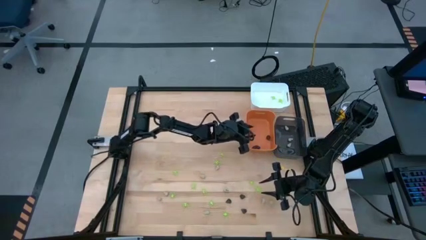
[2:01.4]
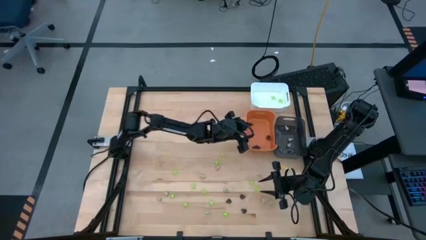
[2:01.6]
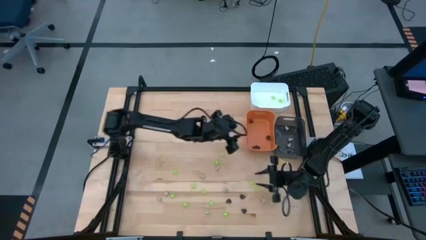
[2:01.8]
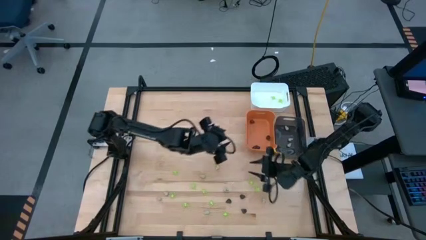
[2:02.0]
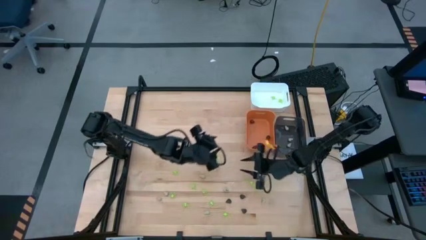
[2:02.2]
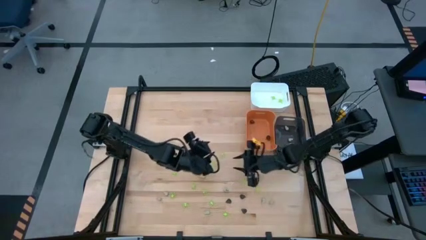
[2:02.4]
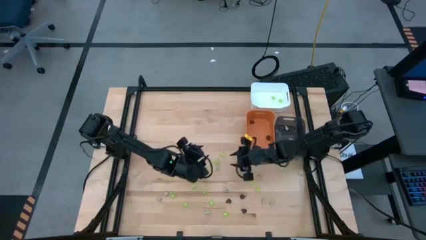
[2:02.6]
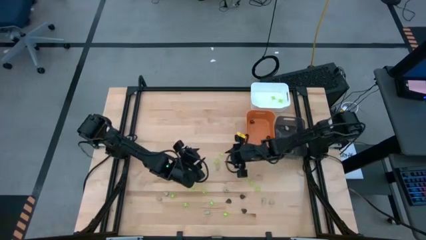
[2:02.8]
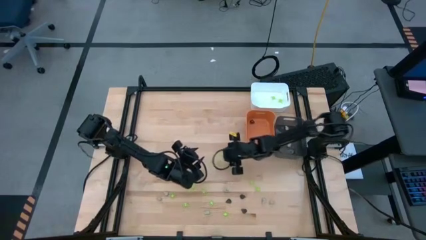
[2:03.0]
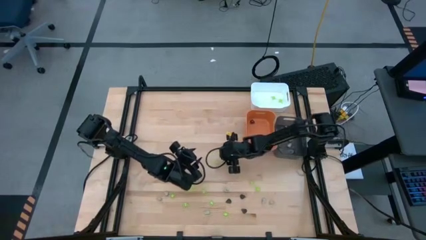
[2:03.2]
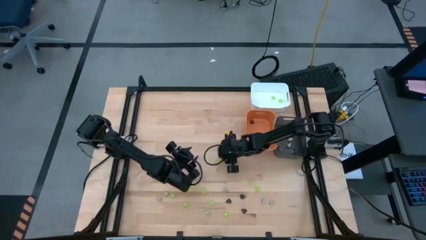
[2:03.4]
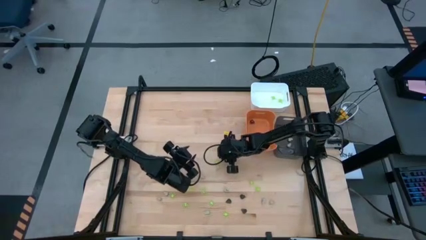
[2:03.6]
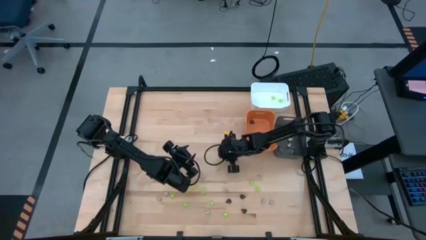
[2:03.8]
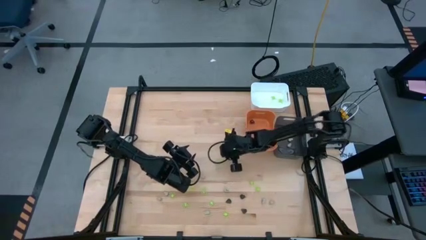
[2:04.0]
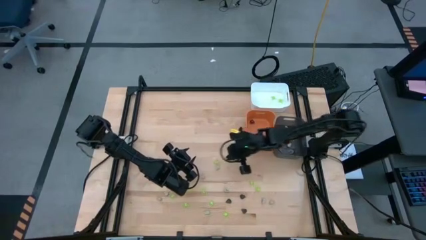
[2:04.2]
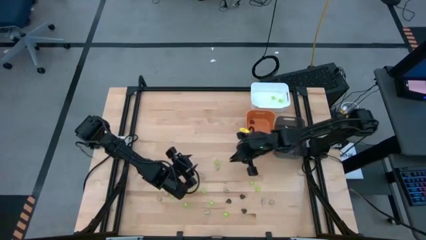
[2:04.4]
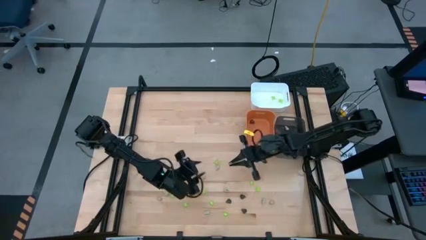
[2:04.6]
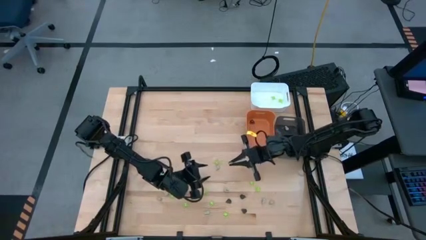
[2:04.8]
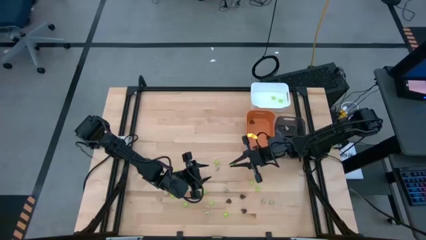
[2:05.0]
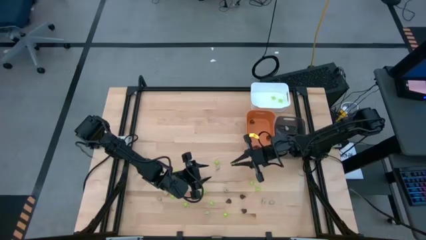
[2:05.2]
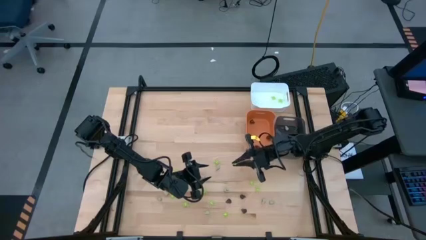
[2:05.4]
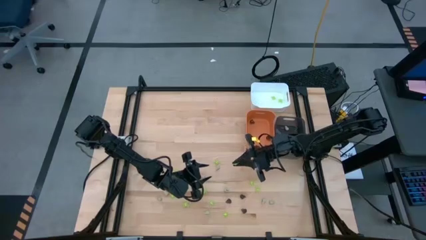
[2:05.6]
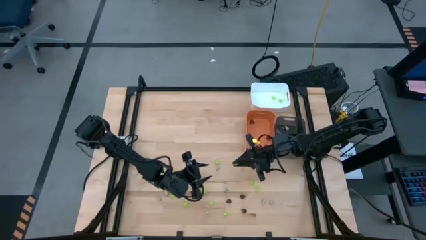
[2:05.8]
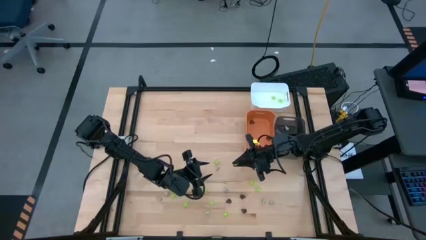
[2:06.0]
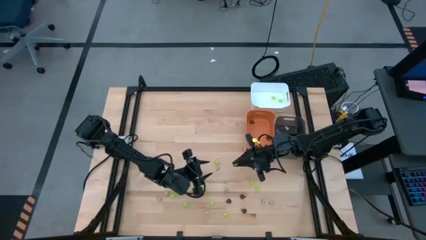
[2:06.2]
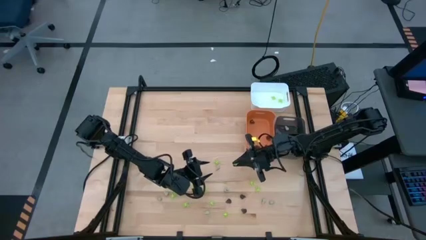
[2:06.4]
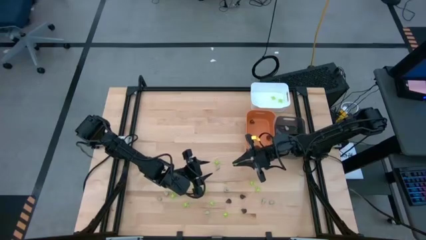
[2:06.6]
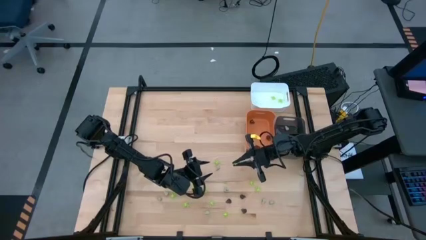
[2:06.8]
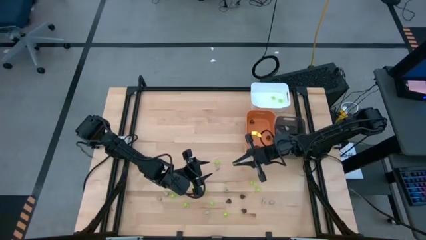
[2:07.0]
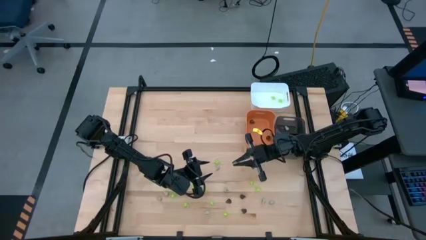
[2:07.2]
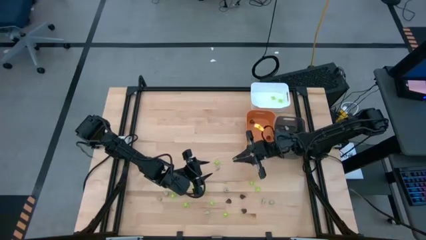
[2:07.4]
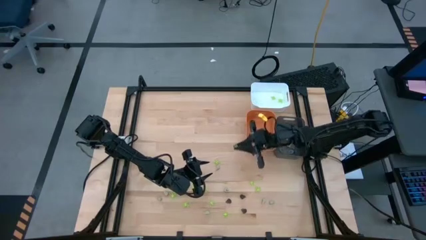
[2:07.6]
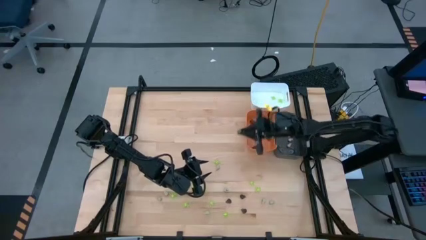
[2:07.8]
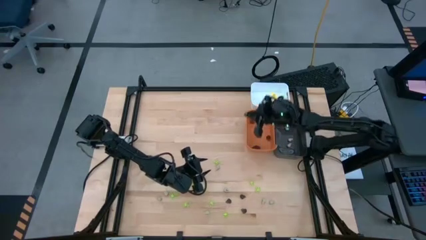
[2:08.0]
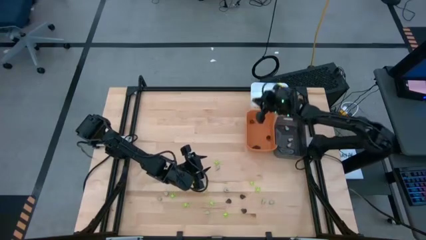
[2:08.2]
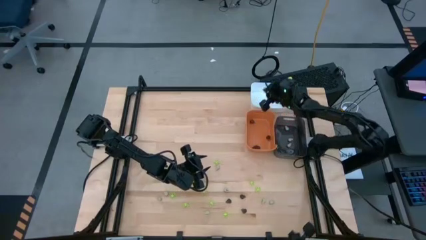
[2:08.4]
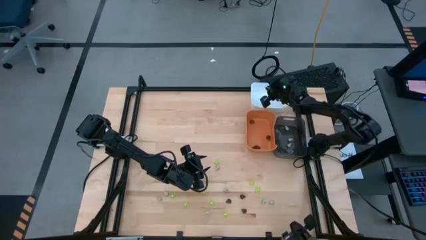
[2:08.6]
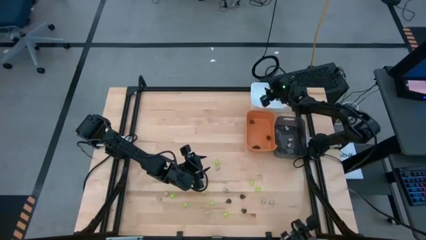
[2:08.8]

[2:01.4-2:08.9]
Task: Sort Halloween decoration
Put the green spider toy into the white bin

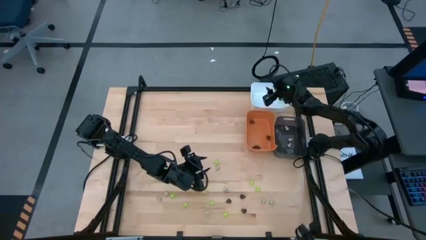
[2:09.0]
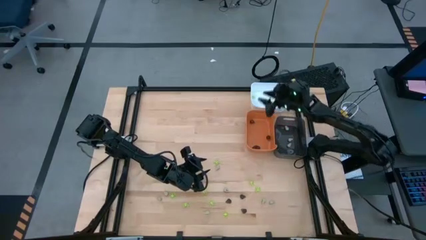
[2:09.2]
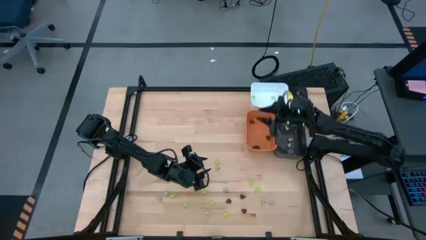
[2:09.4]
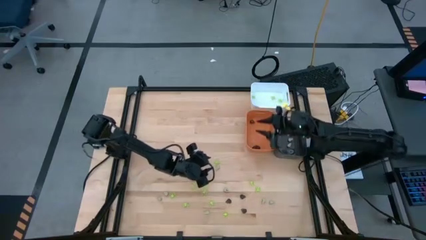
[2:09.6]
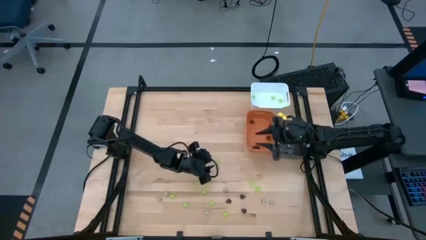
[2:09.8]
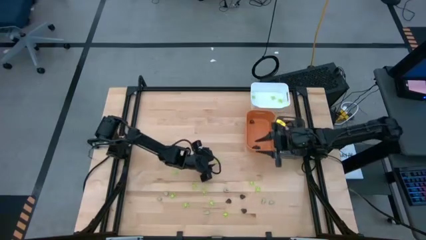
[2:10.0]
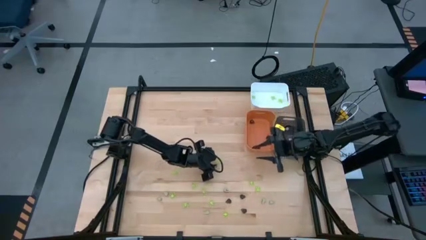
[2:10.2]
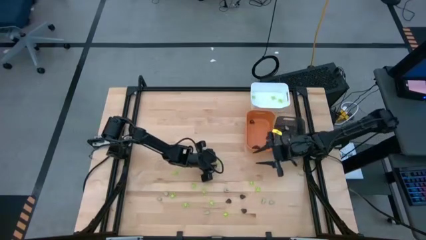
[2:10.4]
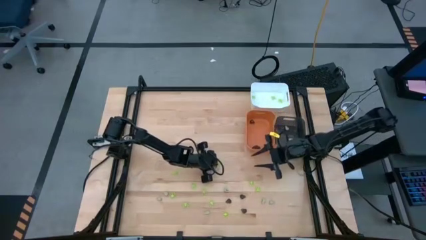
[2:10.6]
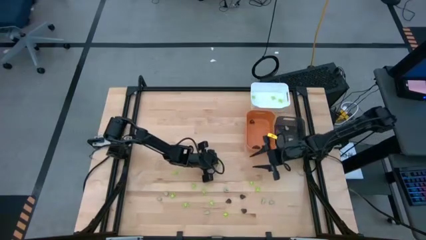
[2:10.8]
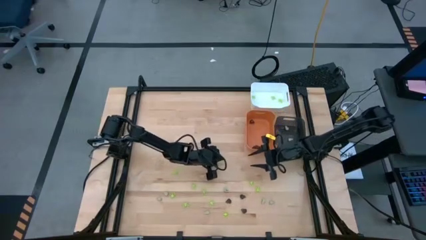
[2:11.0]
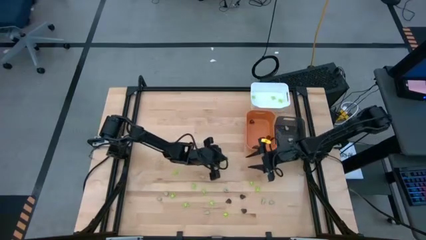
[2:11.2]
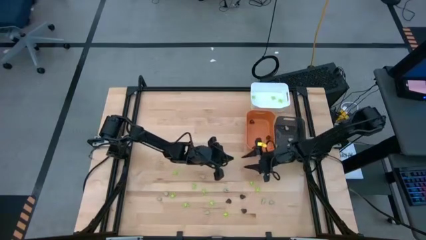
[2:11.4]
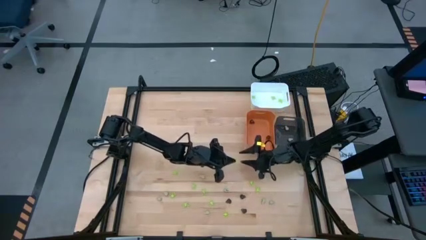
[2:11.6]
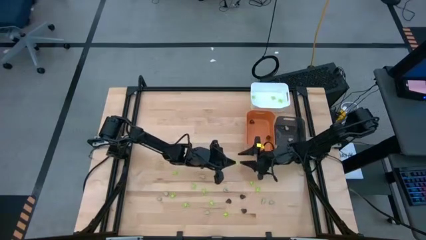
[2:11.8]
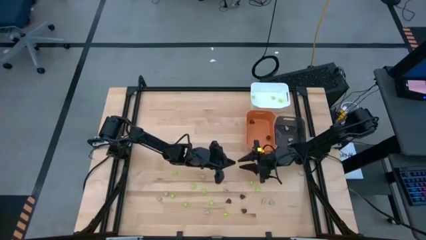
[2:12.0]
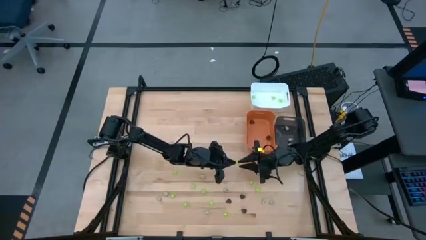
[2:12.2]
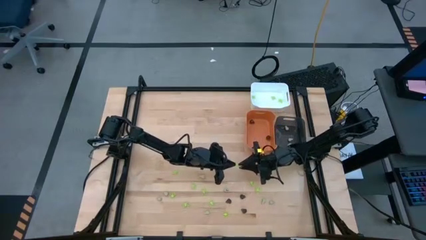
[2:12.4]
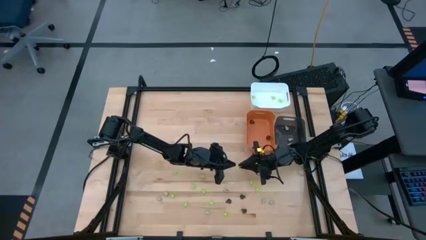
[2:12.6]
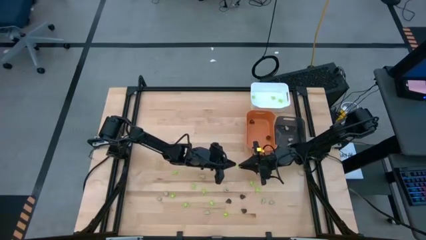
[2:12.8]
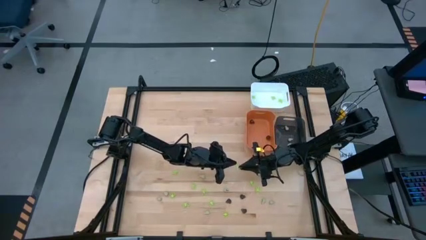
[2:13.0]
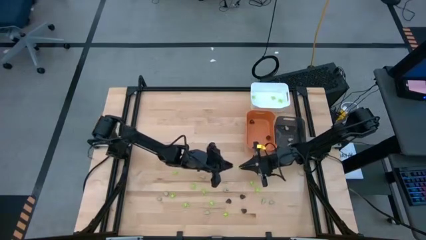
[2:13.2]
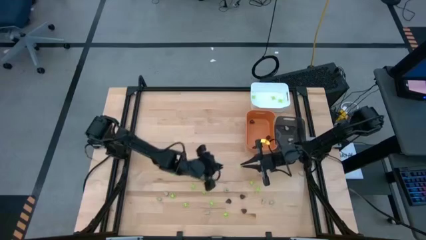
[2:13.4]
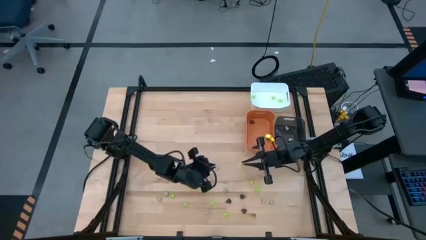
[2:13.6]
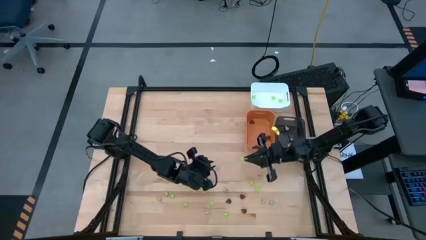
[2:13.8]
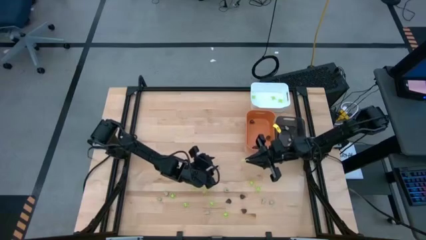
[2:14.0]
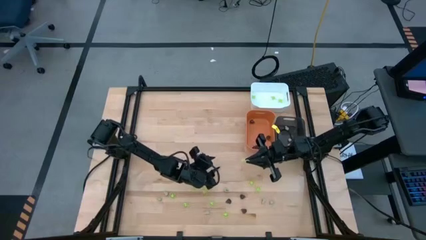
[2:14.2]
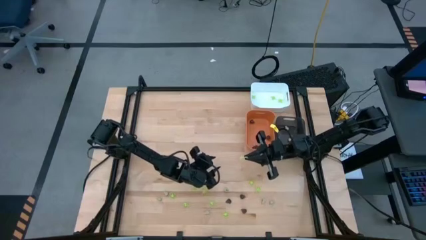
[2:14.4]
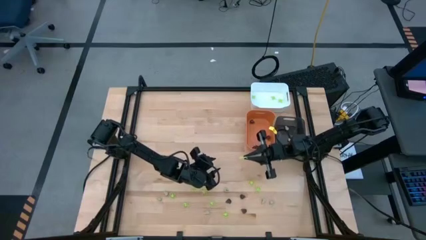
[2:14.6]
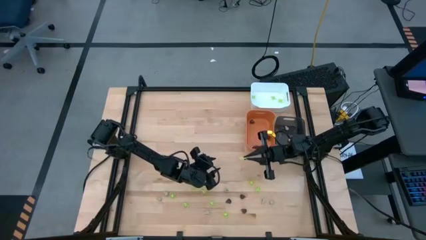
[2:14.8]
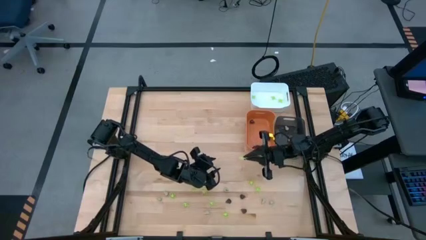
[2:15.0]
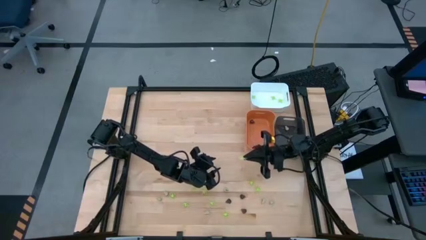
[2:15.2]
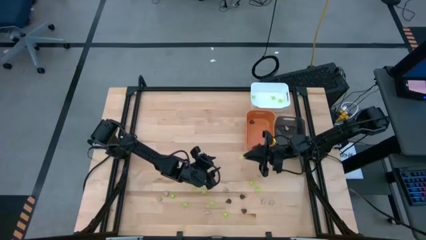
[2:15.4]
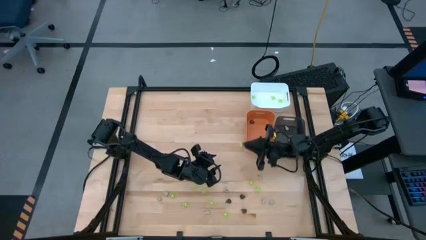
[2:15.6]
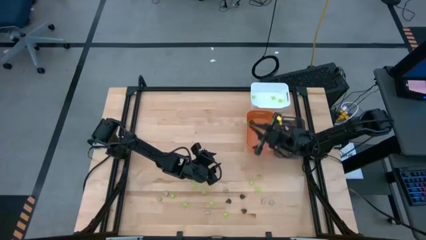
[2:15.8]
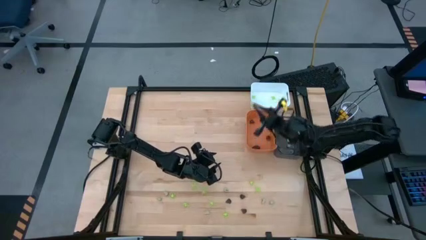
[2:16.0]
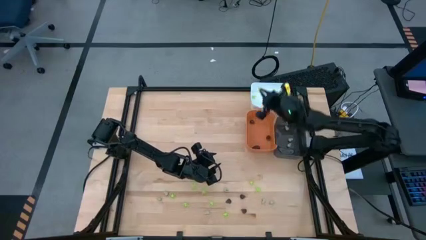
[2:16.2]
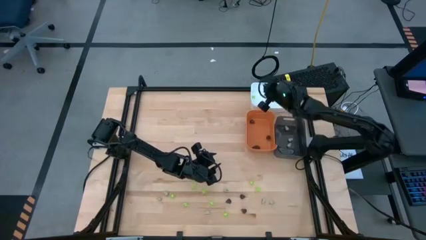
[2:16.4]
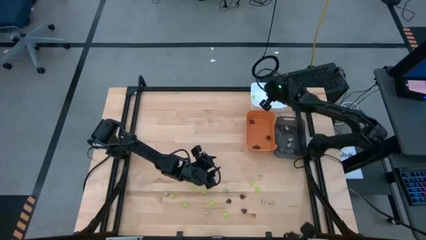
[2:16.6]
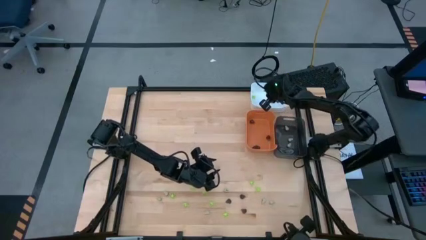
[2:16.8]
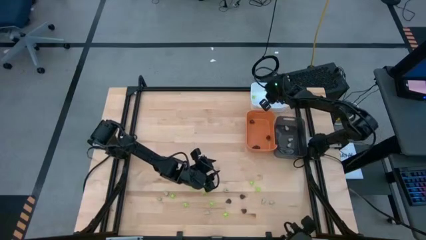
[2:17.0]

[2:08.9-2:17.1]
Put the green spider toy into the white bin
